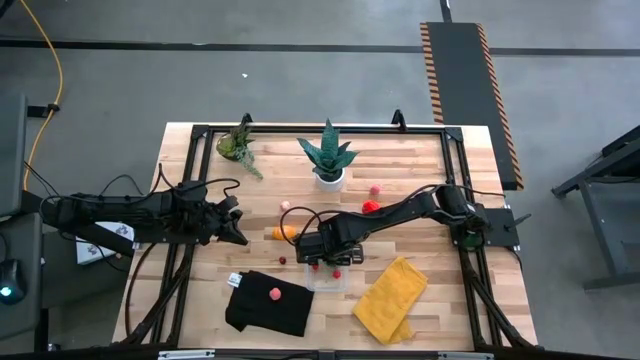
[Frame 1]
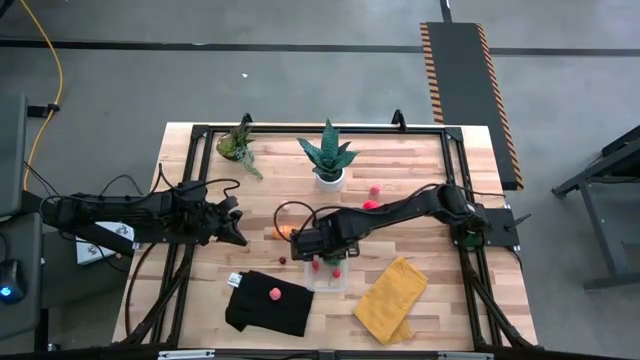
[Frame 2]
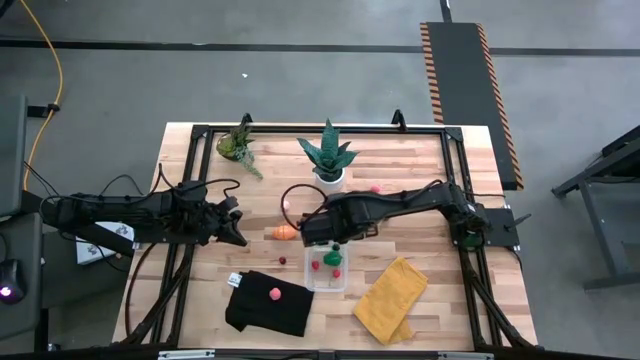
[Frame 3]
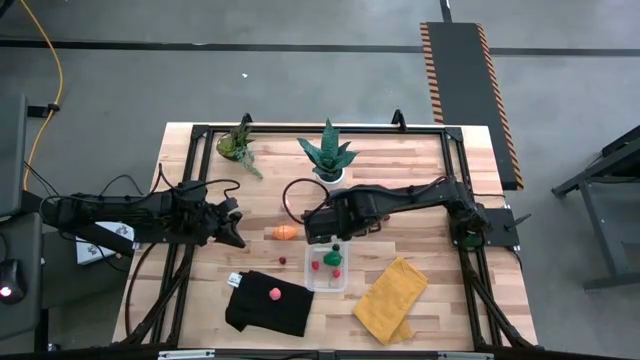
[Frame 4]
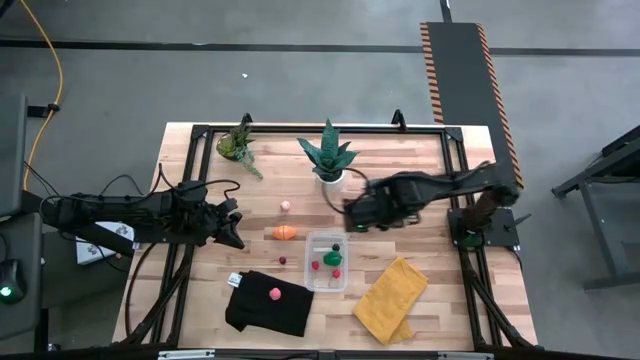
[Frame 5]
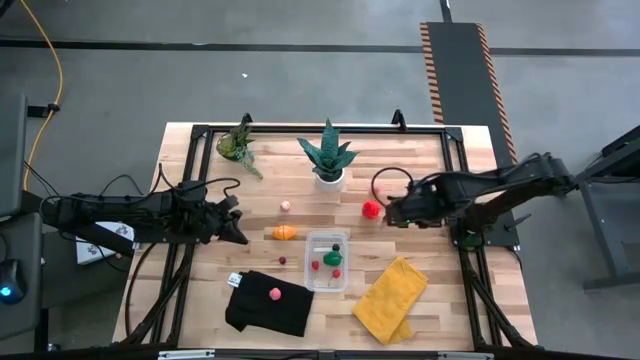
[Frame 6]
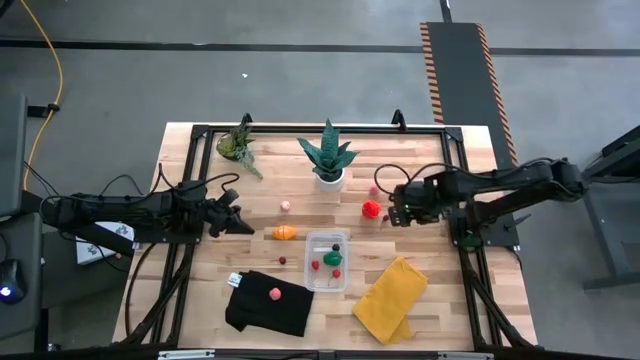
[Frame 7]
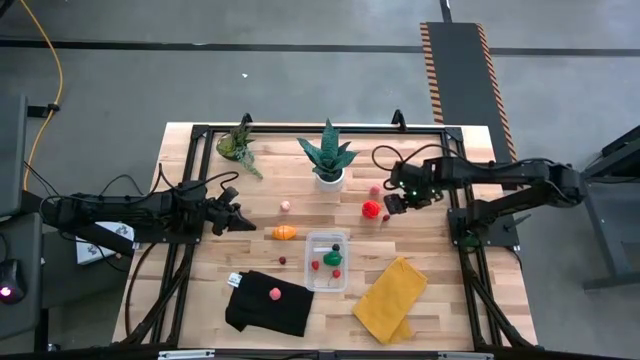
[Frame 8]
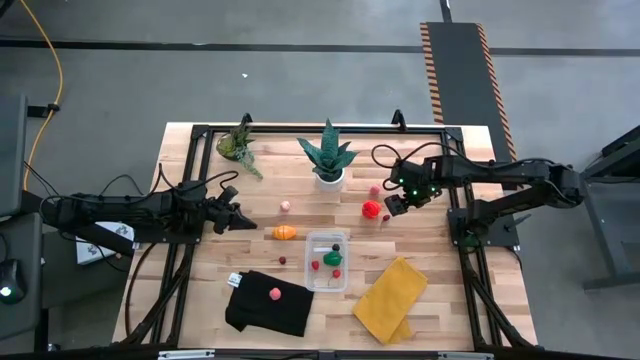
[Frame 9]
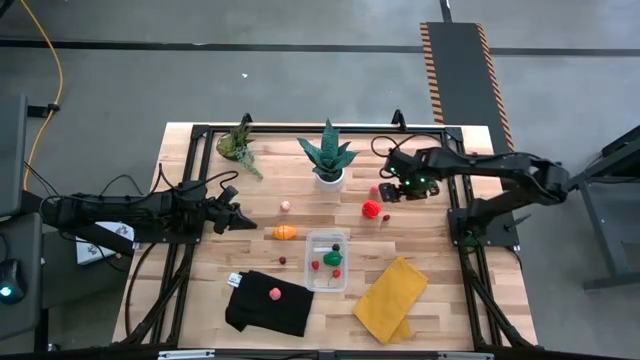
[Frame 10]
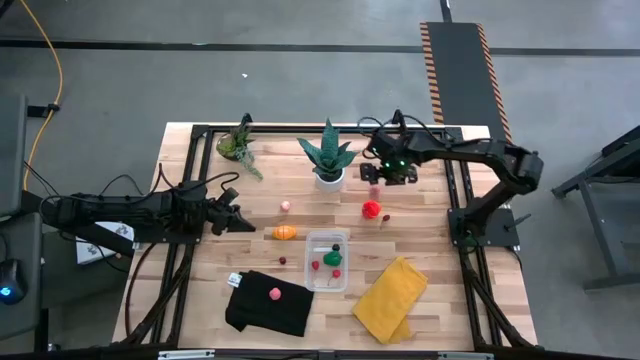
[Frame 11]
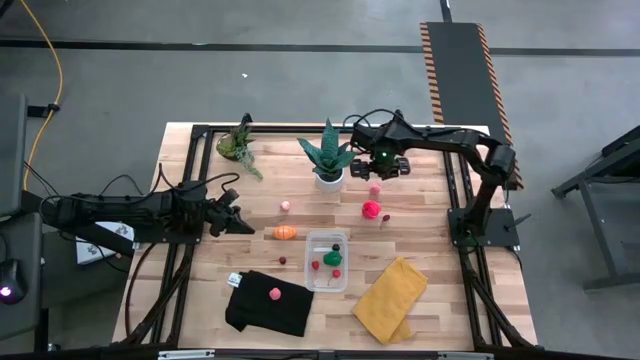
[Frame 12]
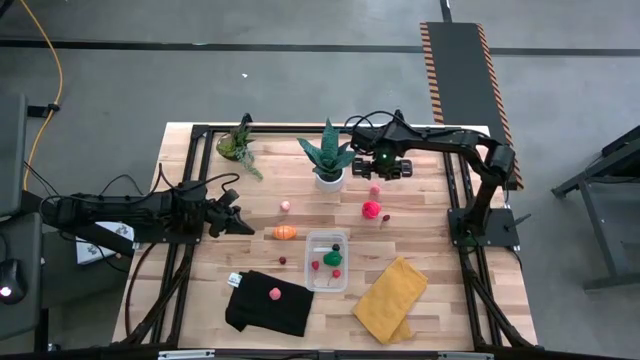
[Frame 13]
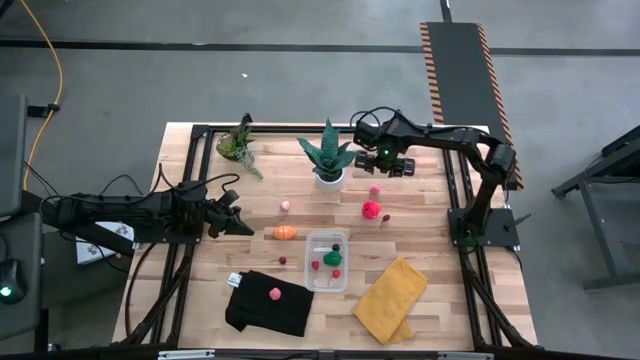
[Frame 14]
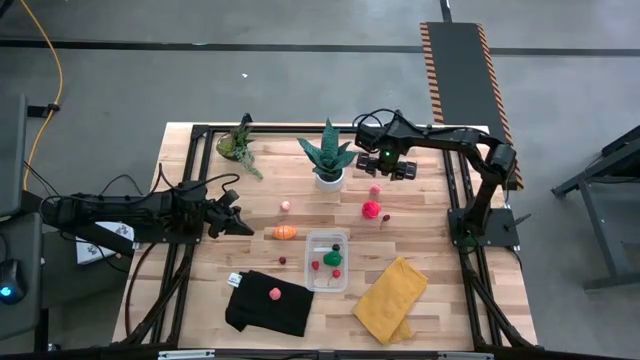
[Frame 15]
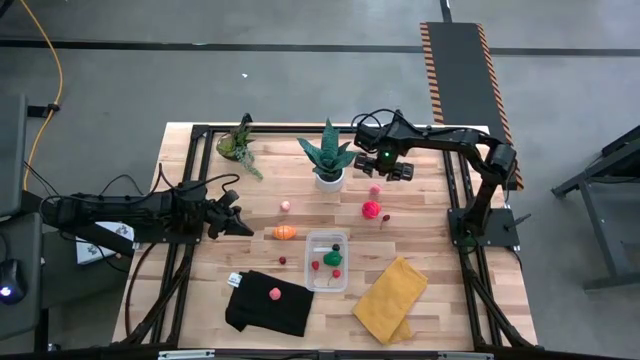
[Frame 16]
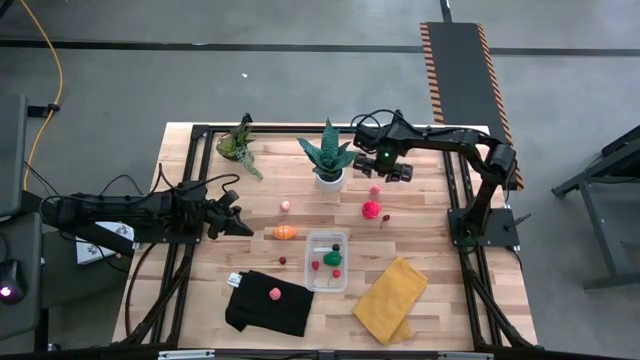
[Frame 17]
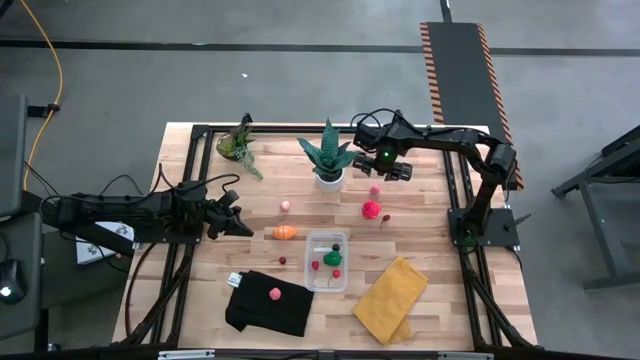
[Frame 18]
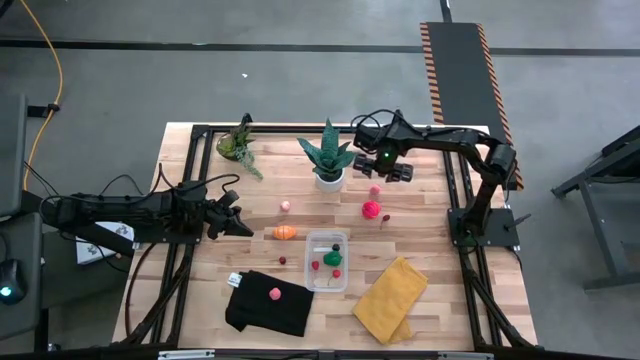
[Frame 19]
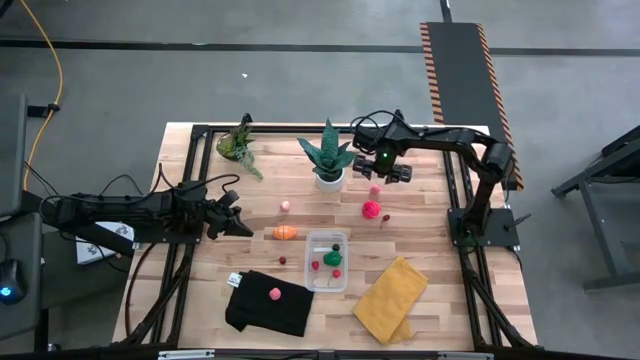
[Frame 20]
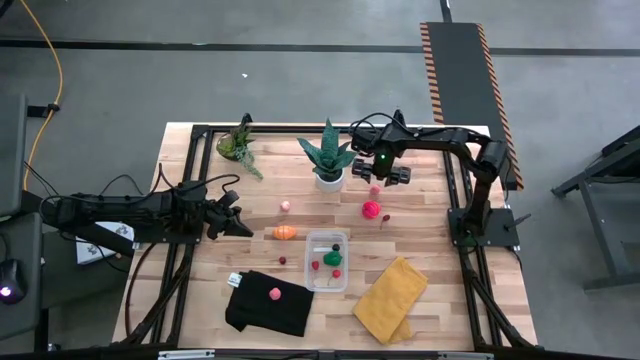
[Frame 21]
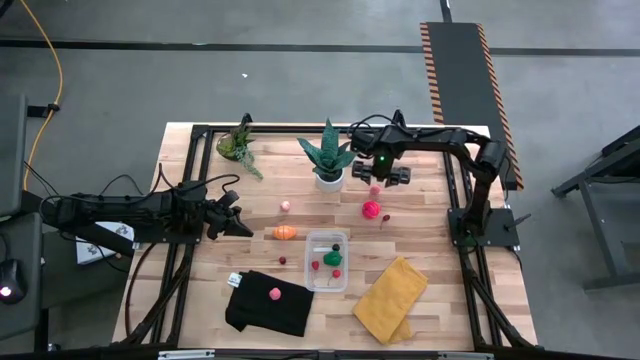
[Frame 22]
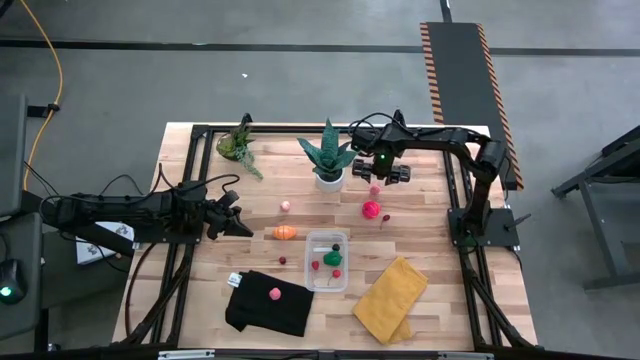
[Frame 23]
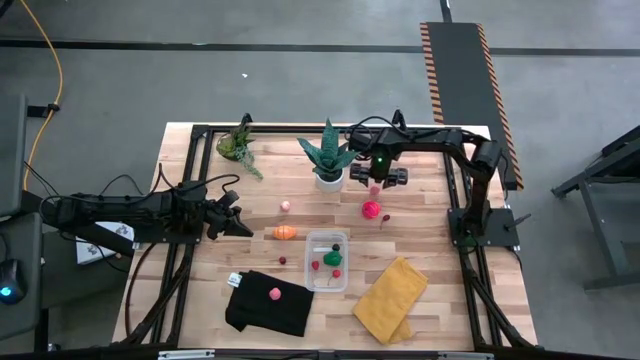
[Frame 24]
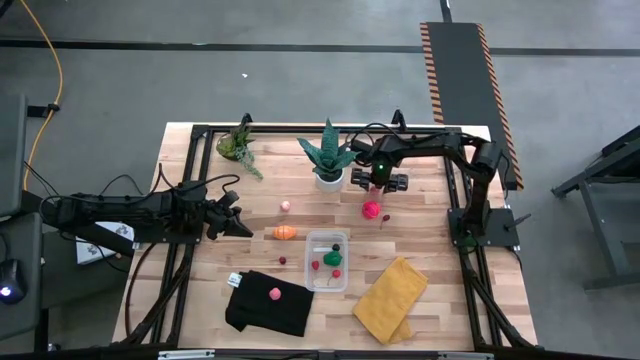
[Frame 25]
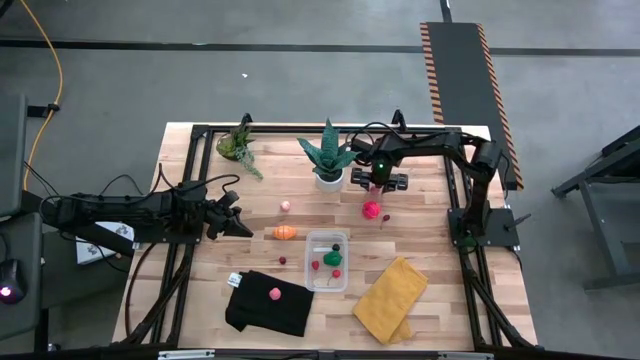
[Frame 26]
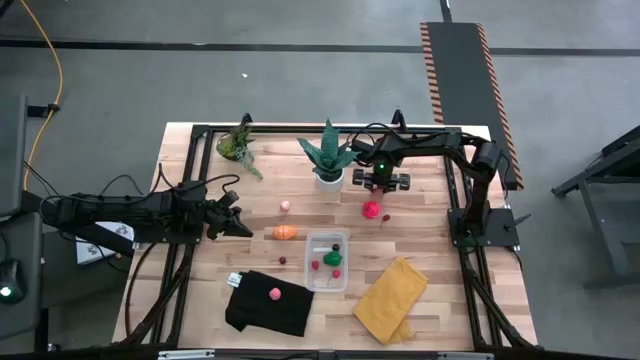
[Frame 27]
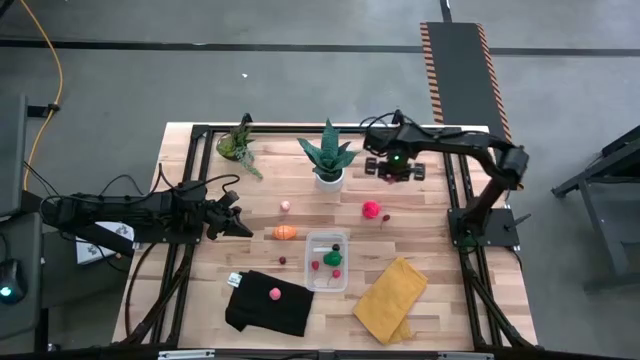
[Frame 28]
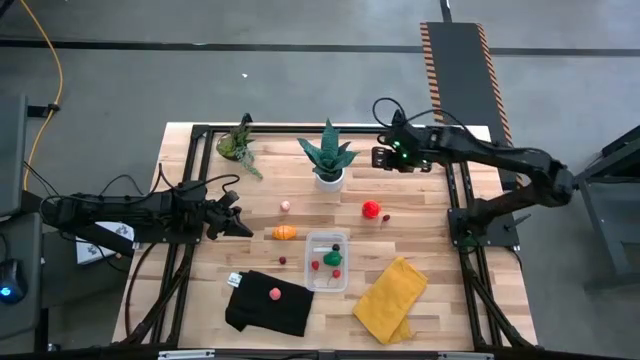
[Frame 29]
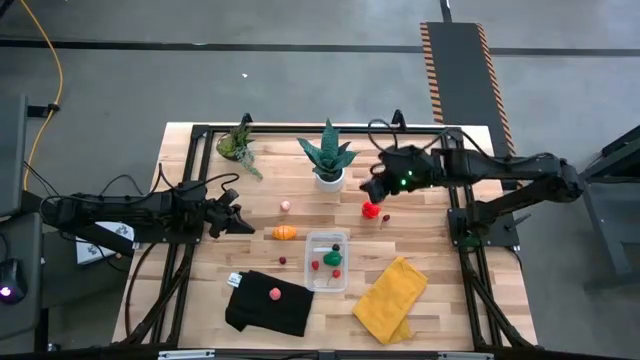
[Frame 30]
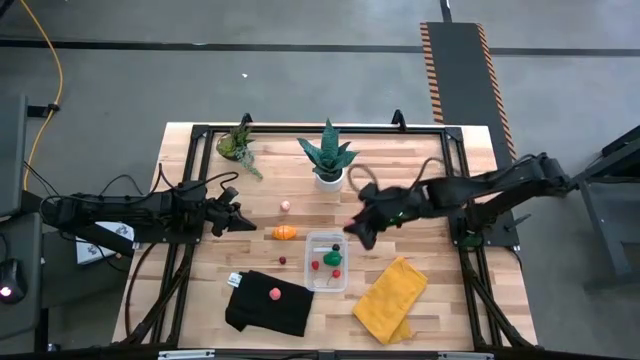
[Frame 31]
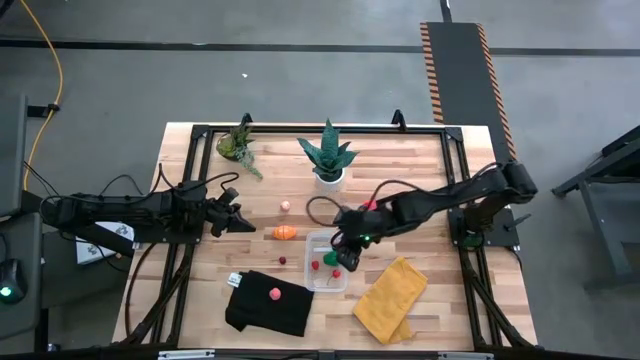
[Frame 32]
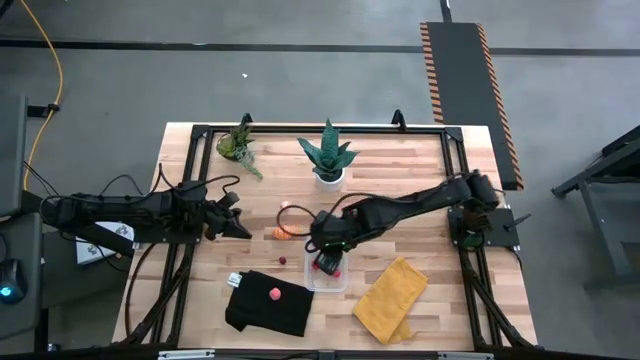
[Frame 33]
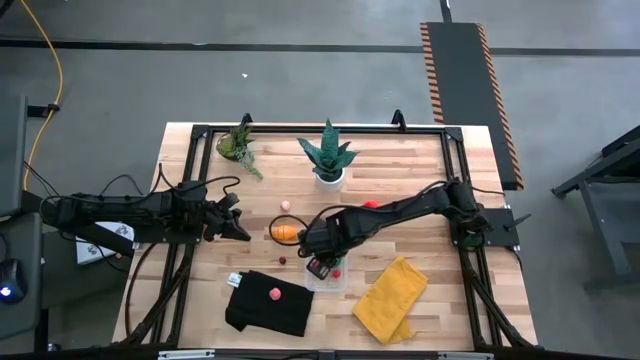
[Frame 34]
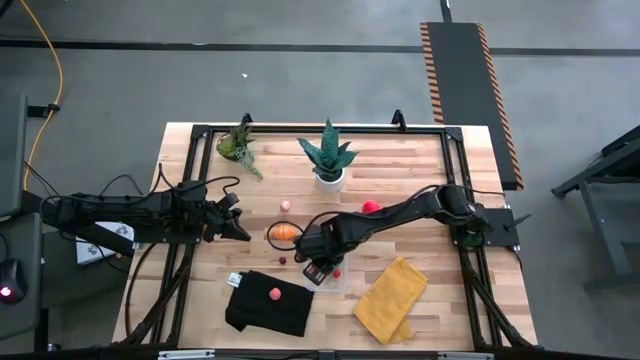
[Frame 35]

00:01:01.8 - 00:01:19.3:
Task: Pick and placing Produce into tupperware
Put the top apricot into the transparent container

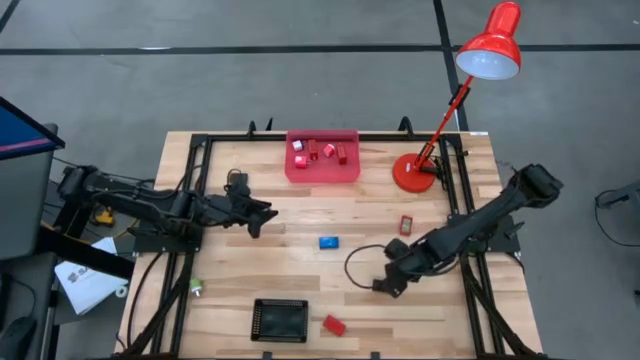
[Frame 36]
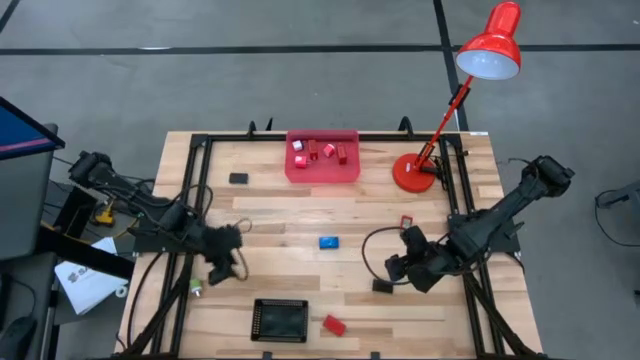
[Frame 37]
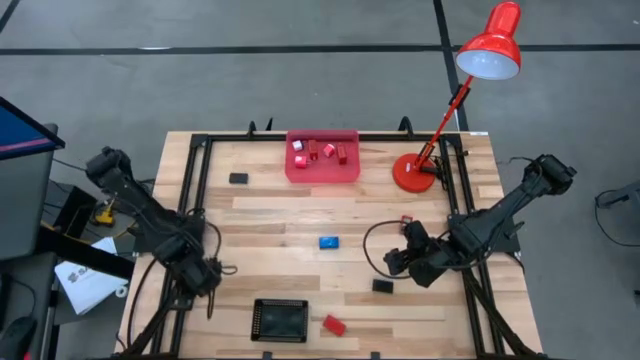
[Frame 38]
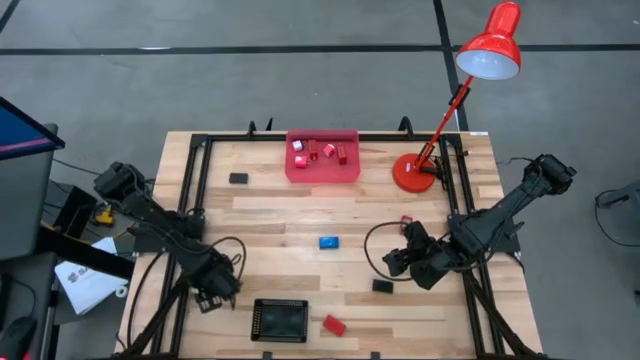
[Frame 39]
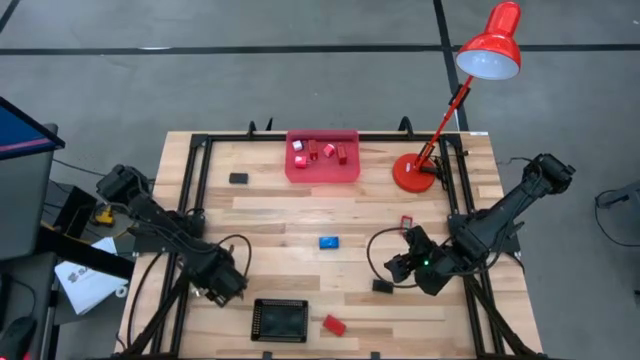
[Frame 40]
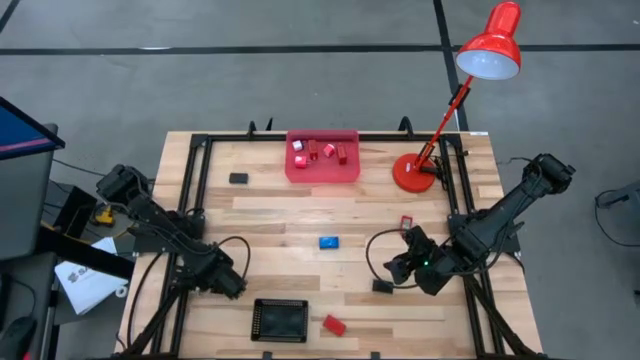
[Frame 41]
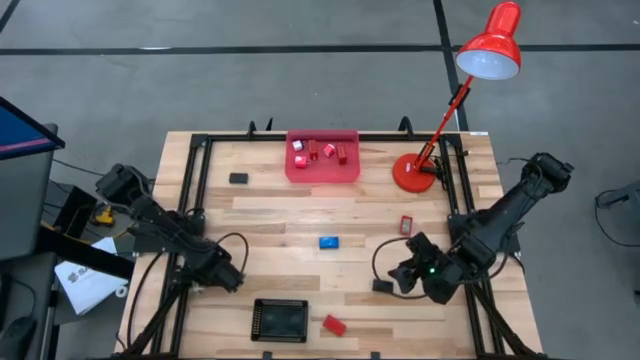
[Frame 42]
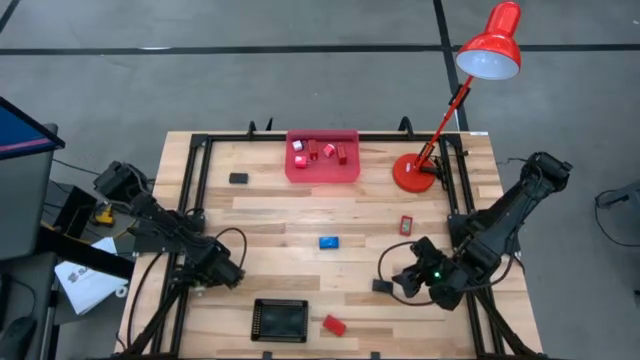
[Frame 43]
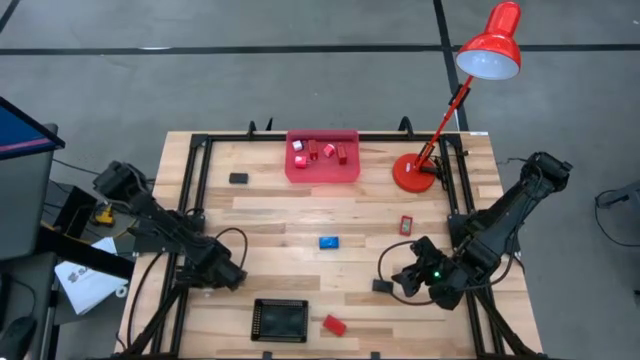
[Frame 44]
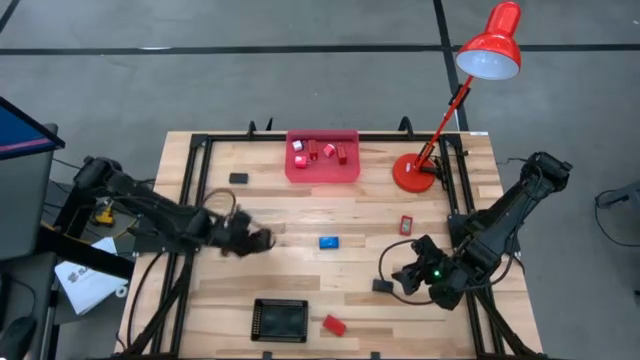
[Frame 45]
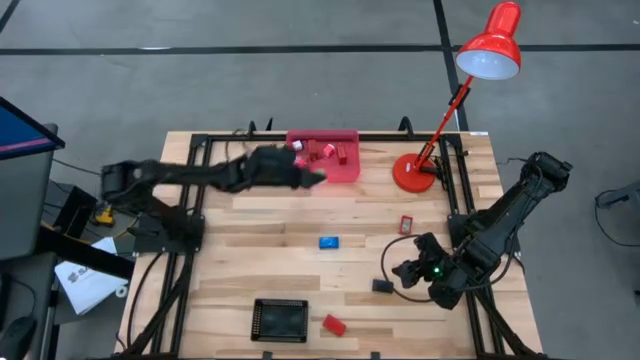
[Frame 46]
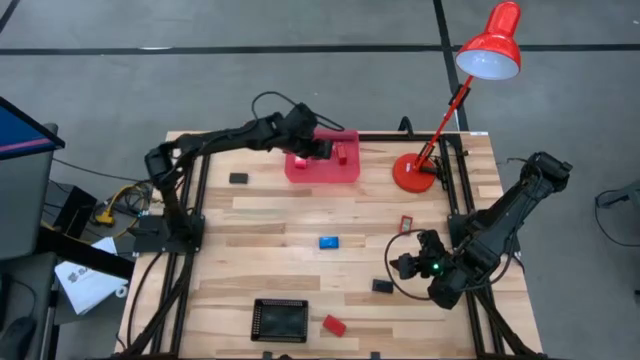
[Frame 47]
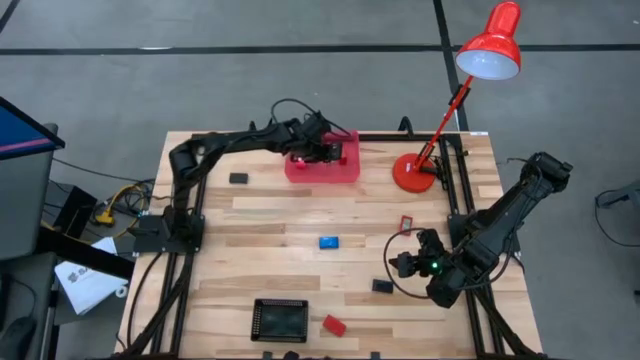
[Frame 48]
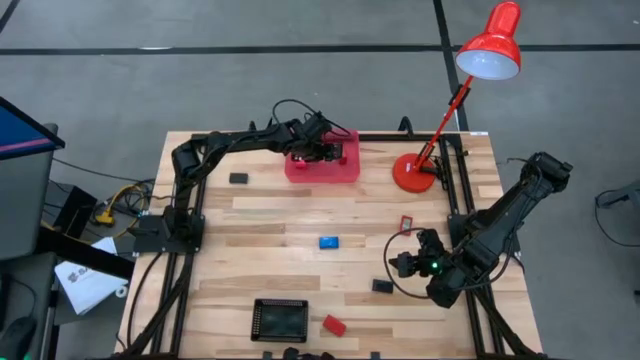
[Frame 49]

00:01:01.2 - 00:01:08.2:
Task: Pick & Place Office items
Put the green and white charger adapter into the pink bin
